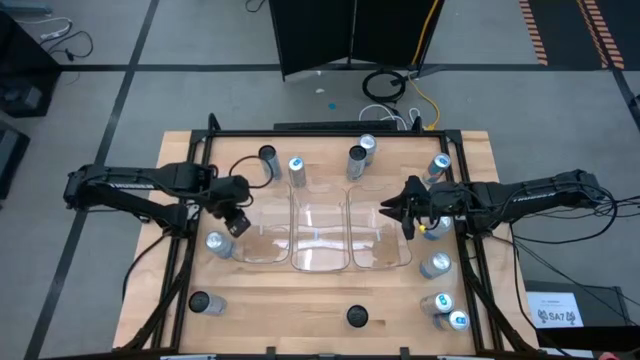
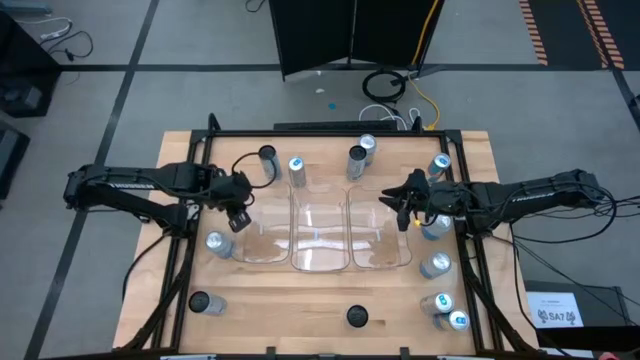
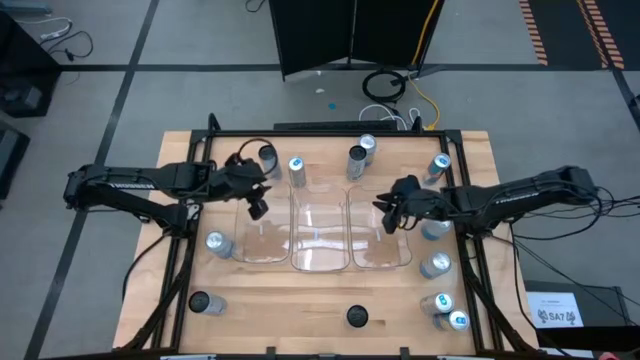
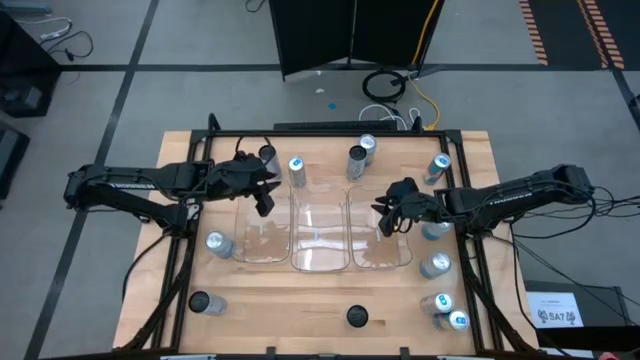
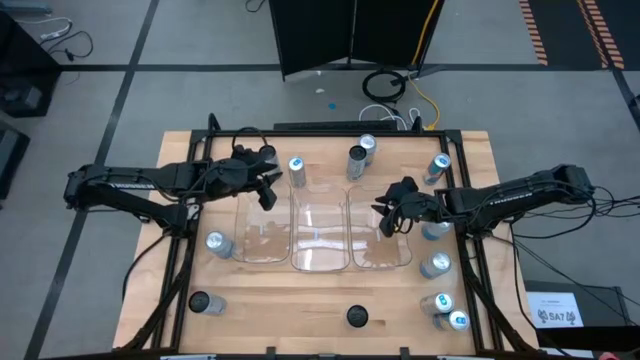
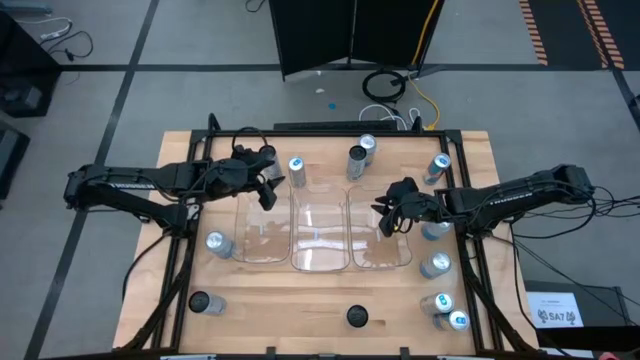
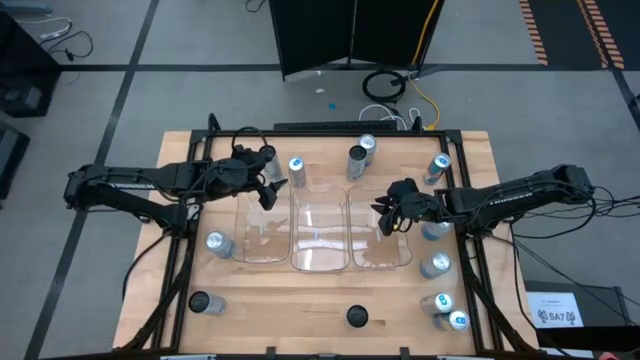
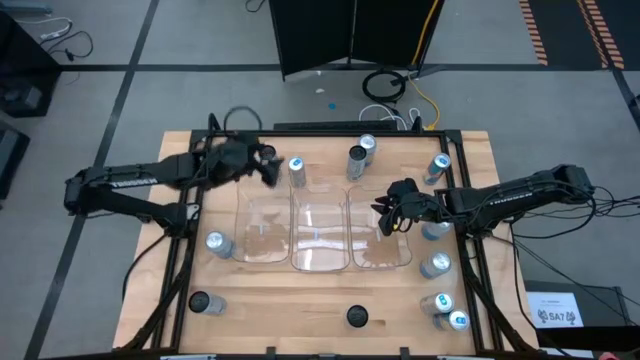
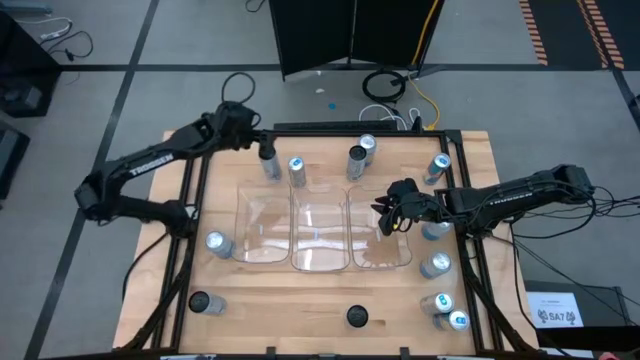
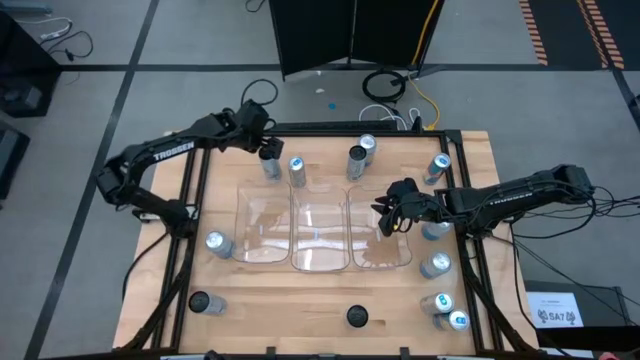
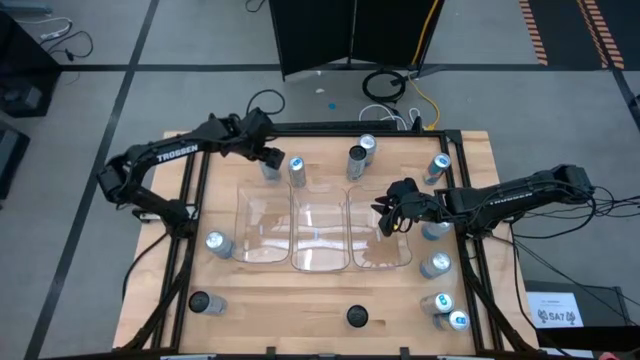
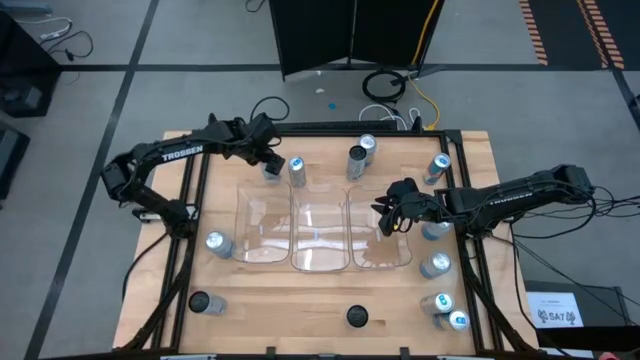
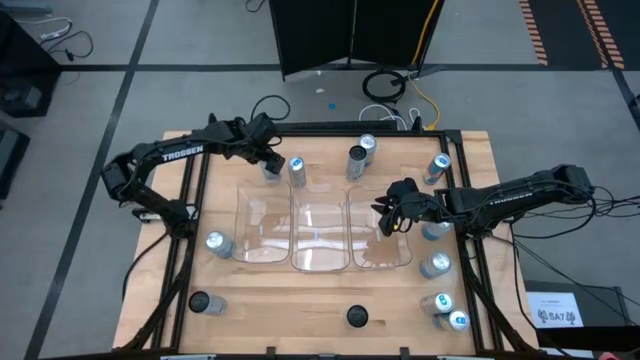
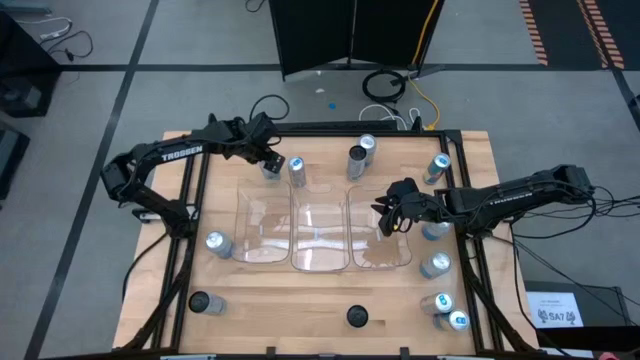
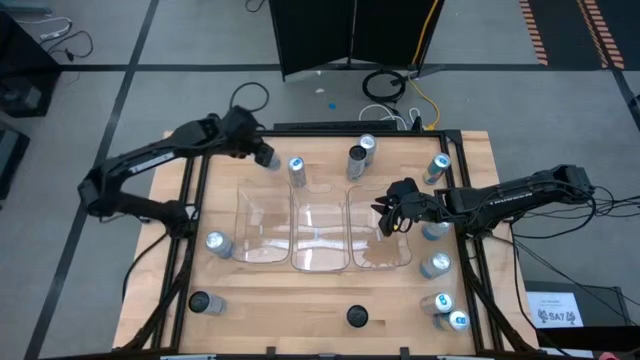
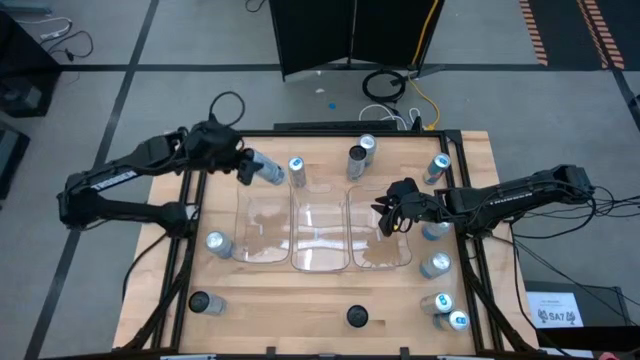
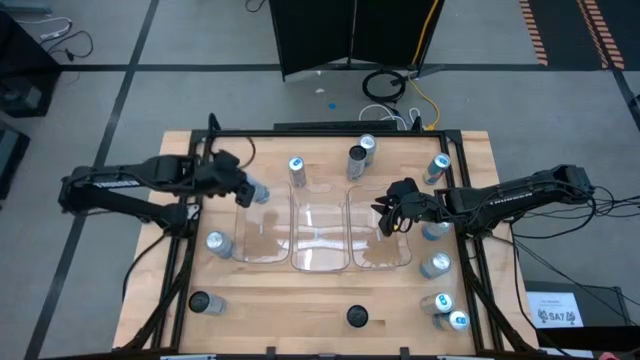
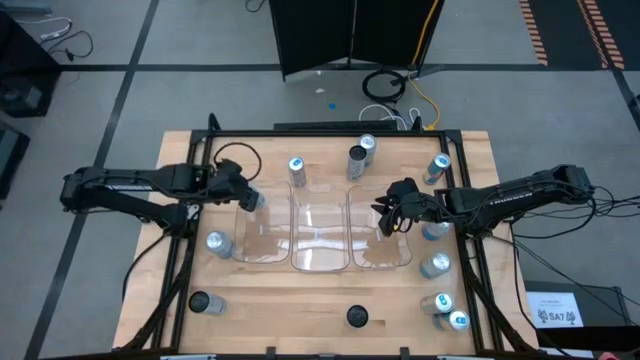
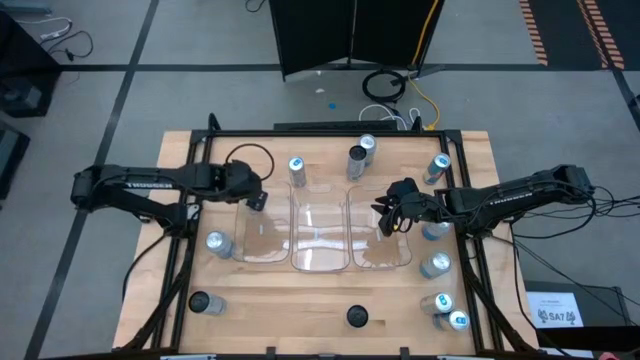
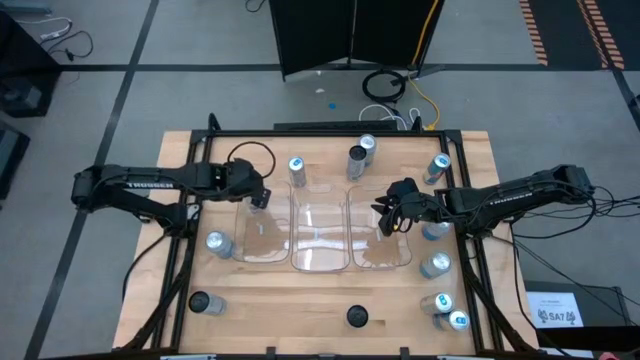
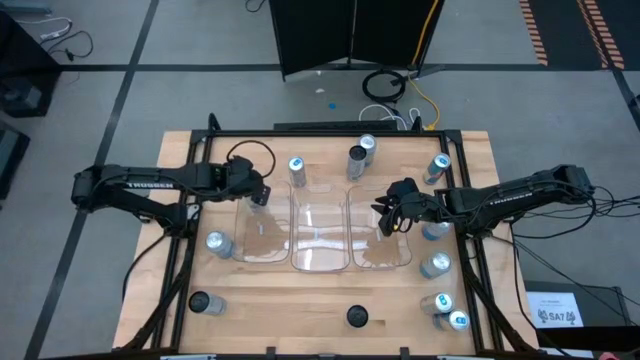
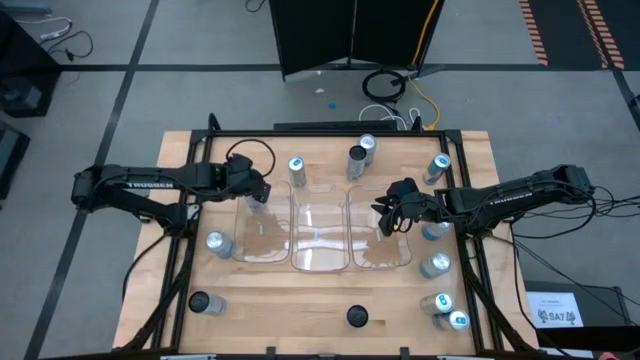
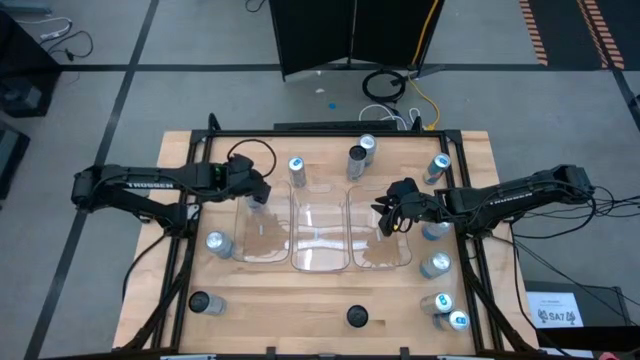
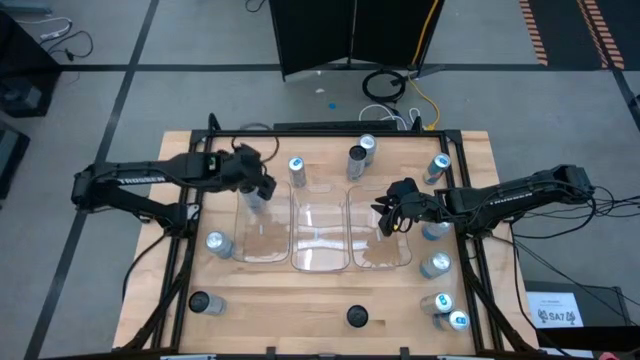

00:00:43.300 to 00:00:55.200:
Task: Sort soda cans
Put the top left white soda can into the left transparent bin

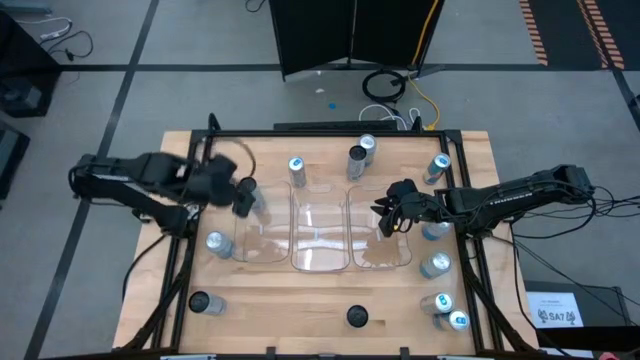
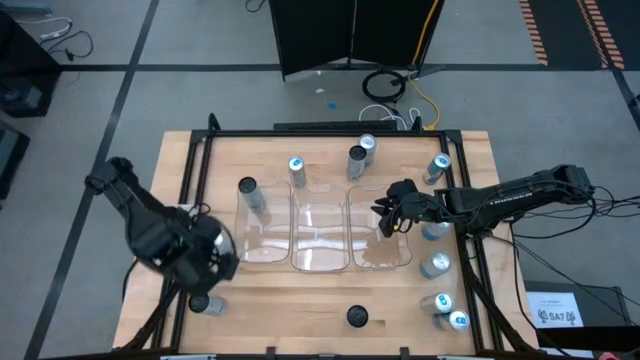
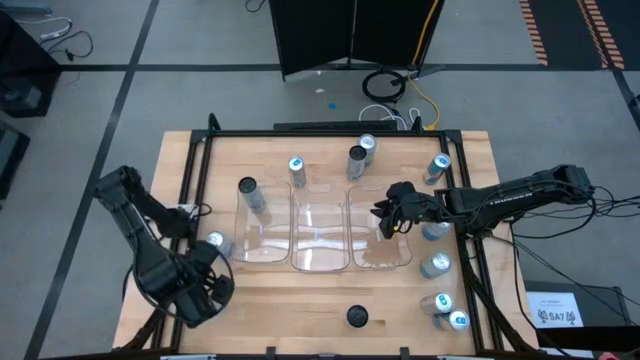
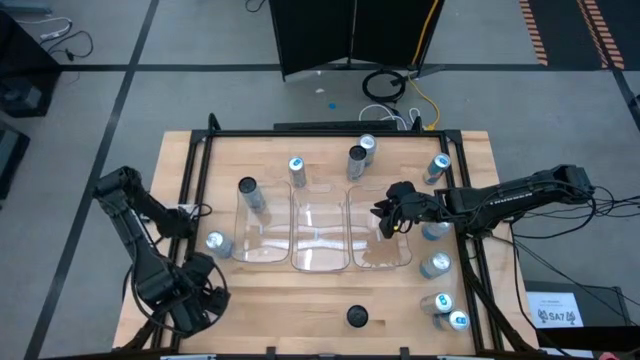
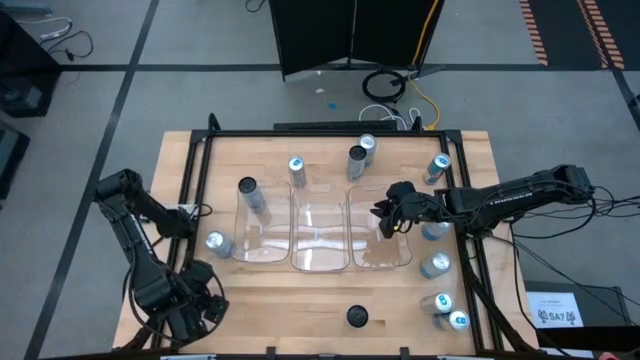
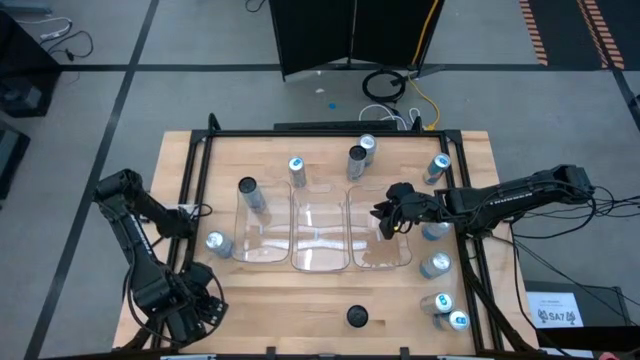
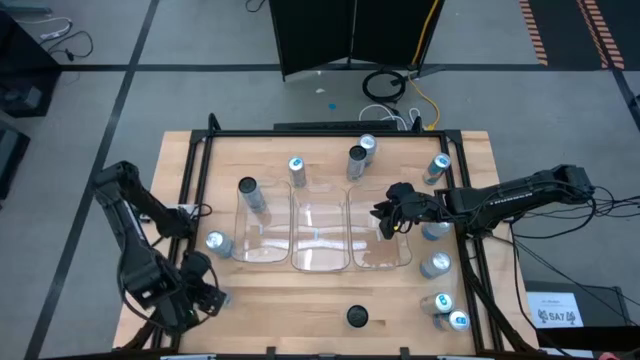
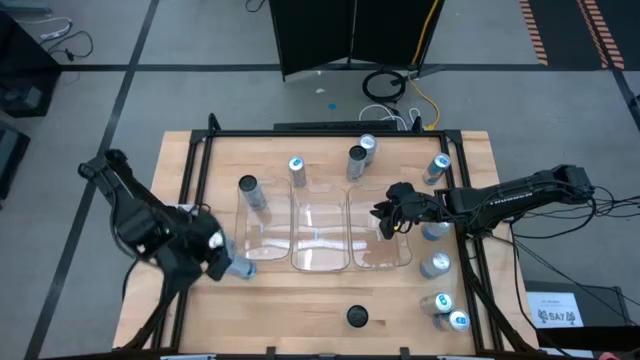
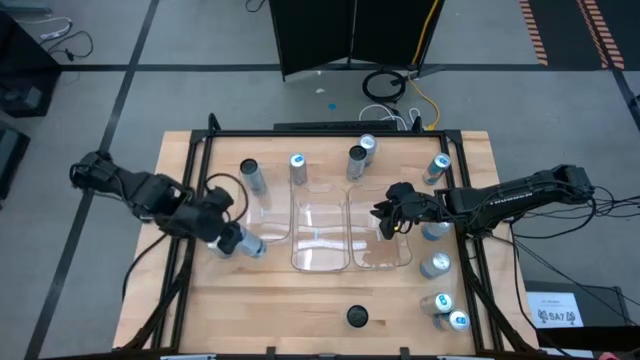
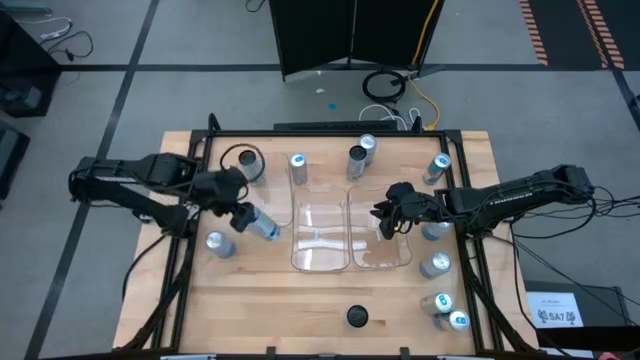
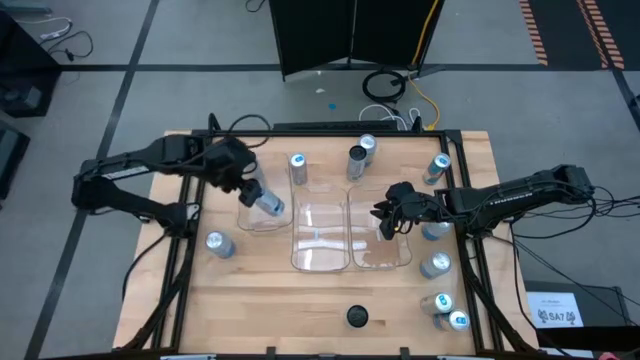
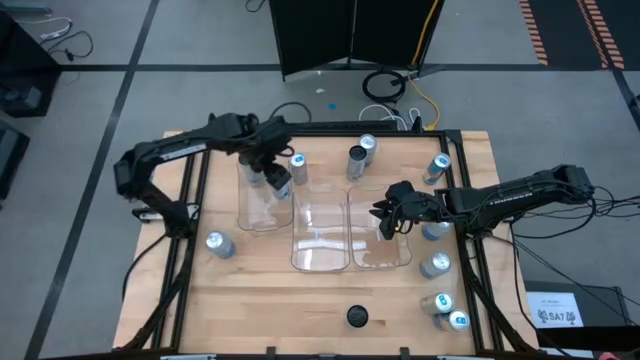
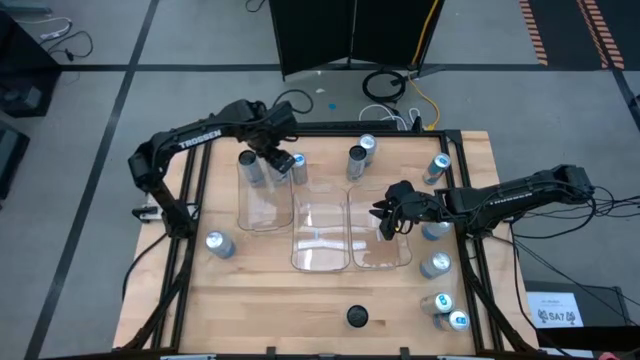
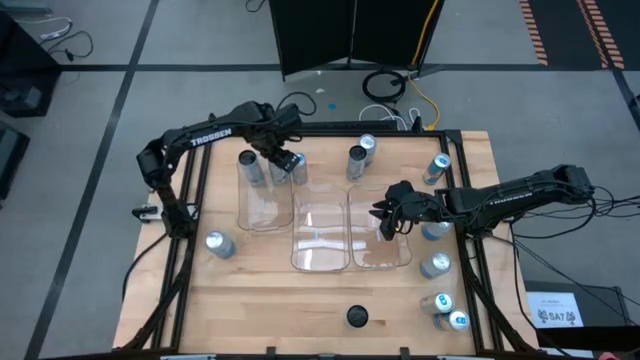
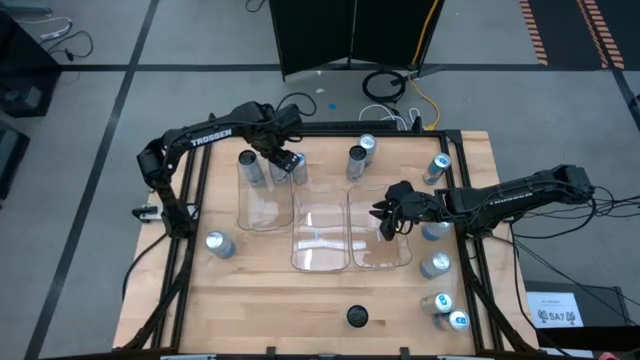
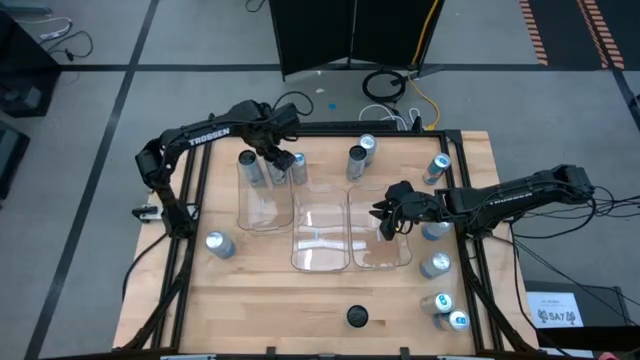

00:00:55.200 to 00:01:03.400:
Put the bottom left white soda can into the left transparent bin

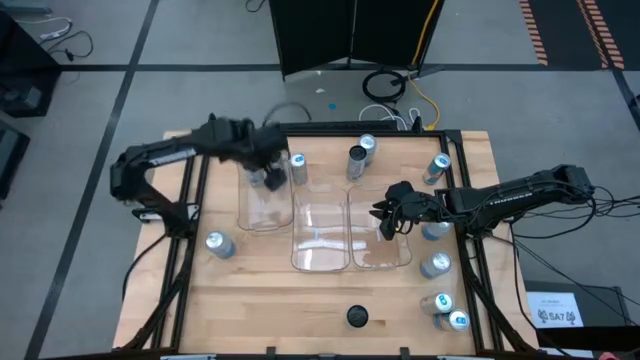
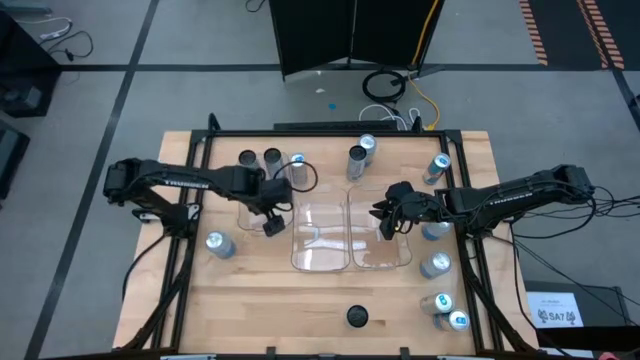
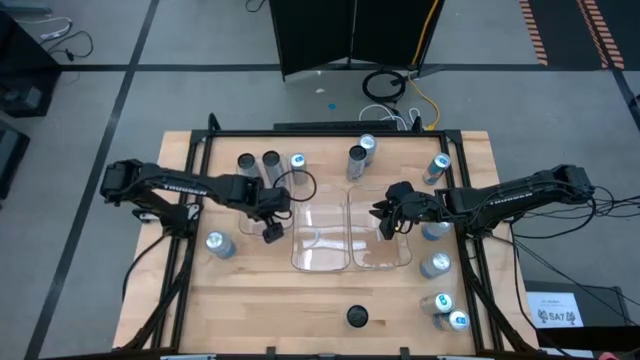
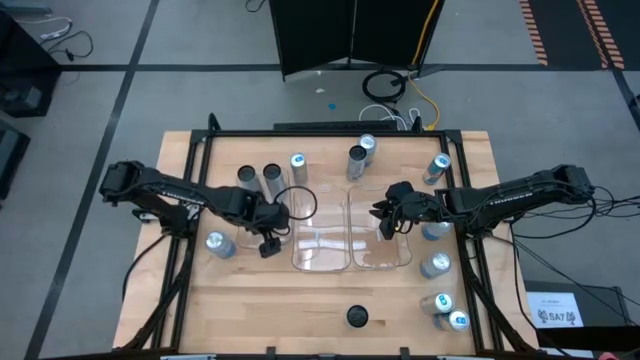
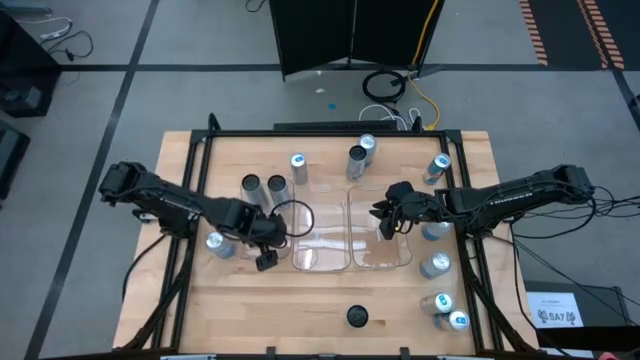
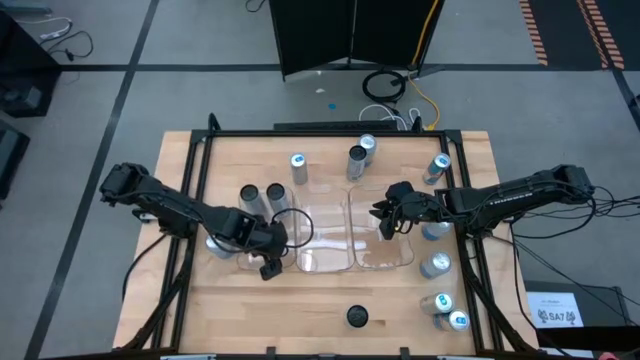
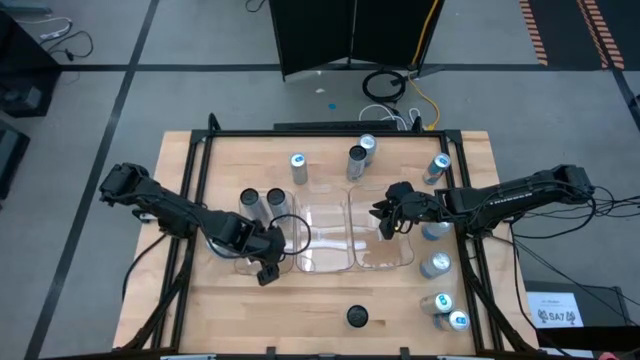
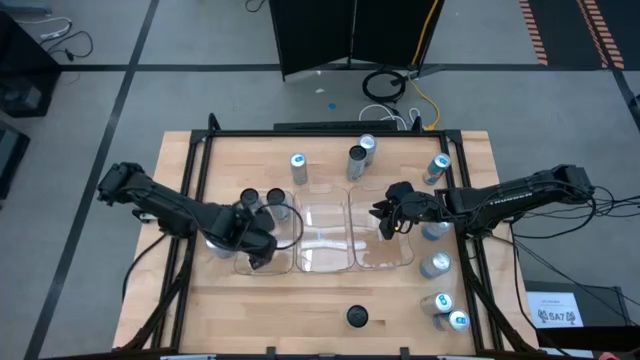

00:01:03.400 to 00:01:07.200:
Adjust the left transparent bin
